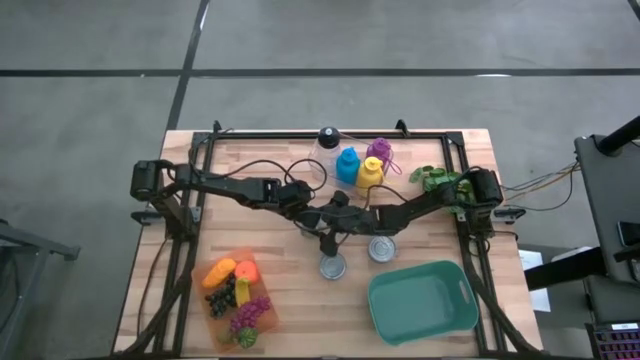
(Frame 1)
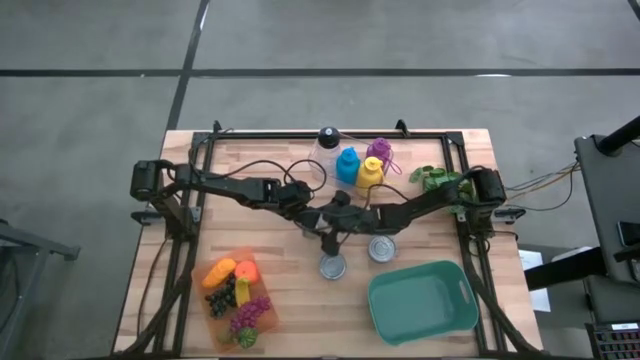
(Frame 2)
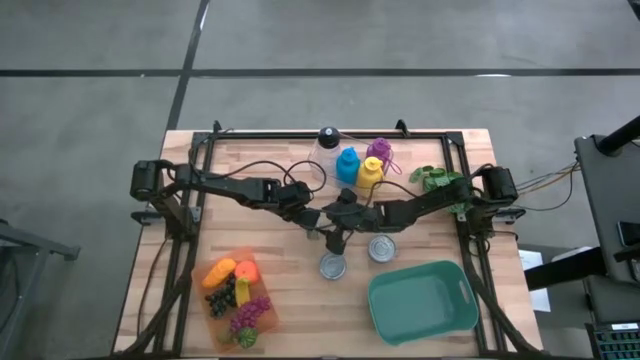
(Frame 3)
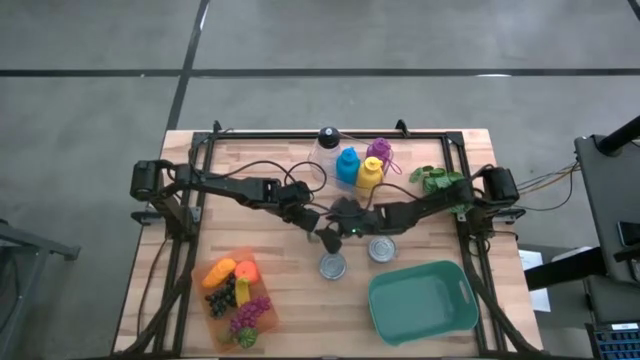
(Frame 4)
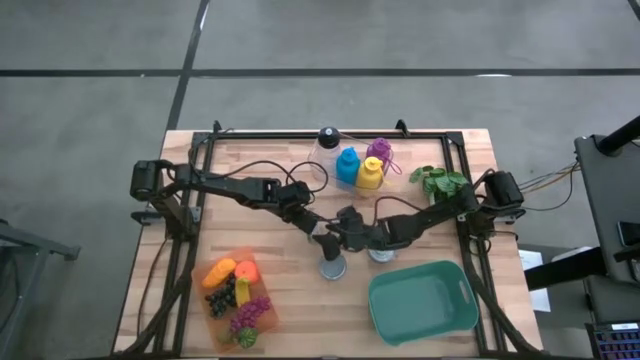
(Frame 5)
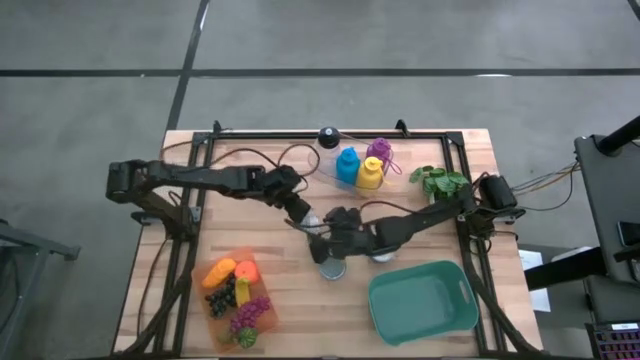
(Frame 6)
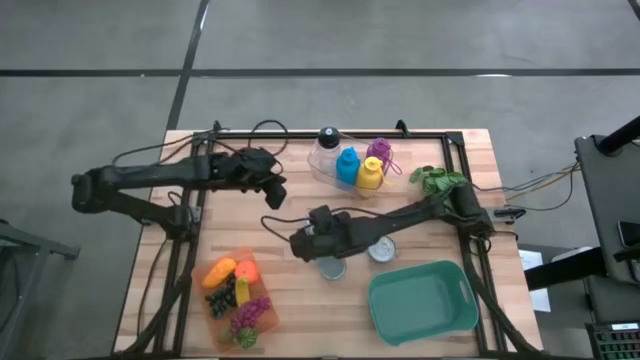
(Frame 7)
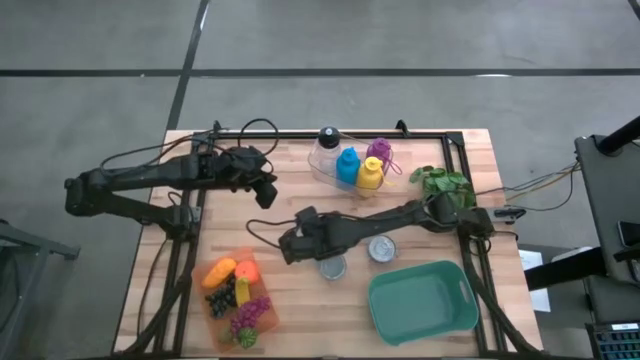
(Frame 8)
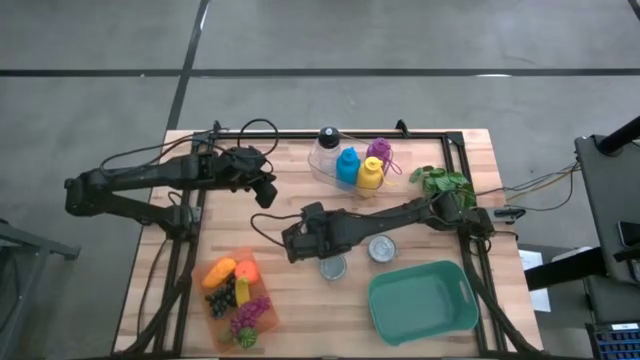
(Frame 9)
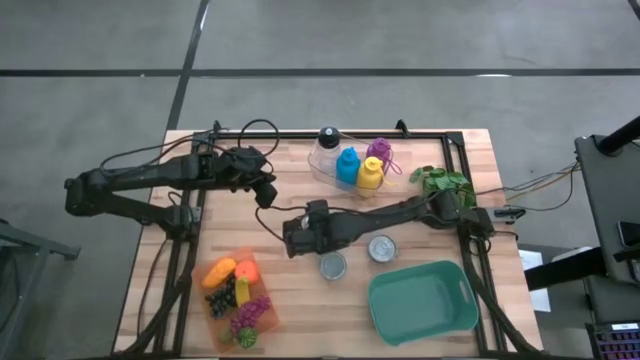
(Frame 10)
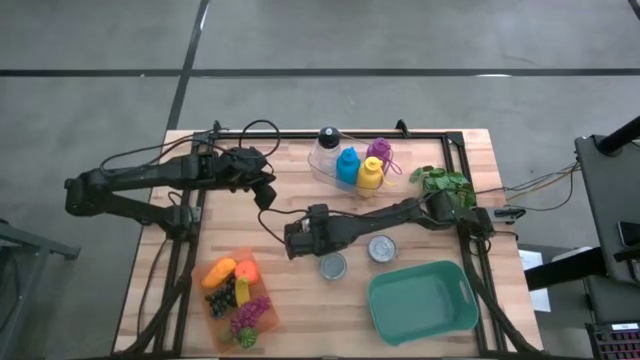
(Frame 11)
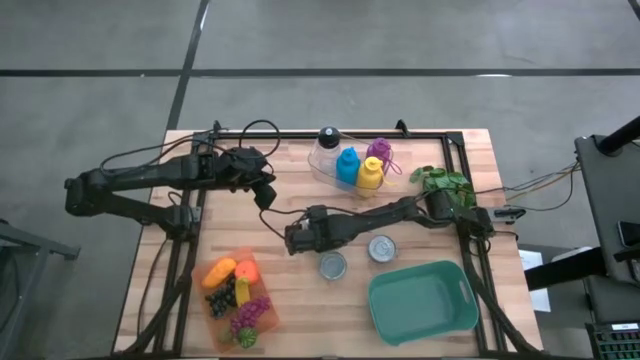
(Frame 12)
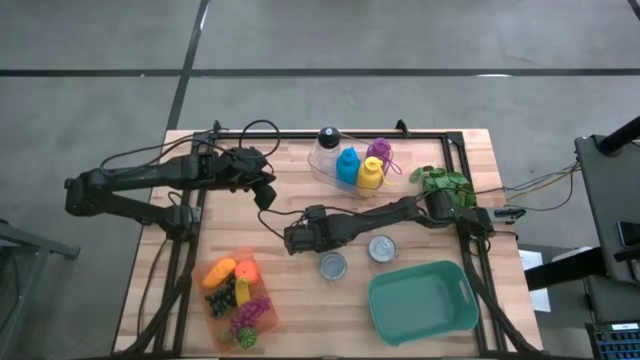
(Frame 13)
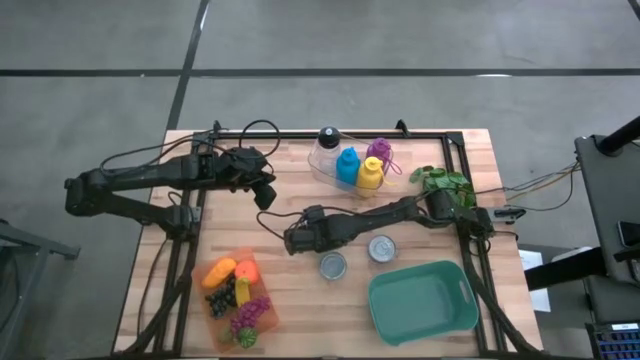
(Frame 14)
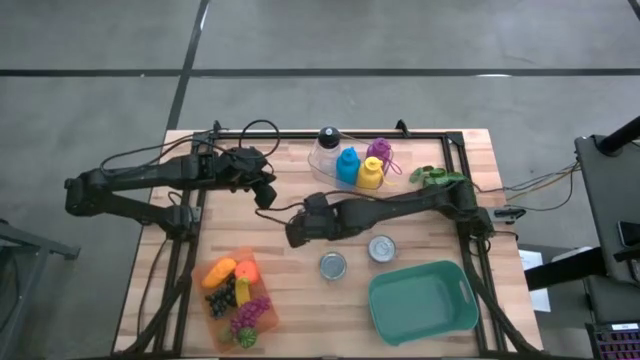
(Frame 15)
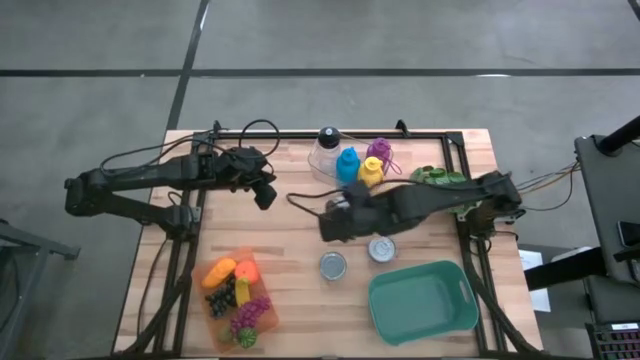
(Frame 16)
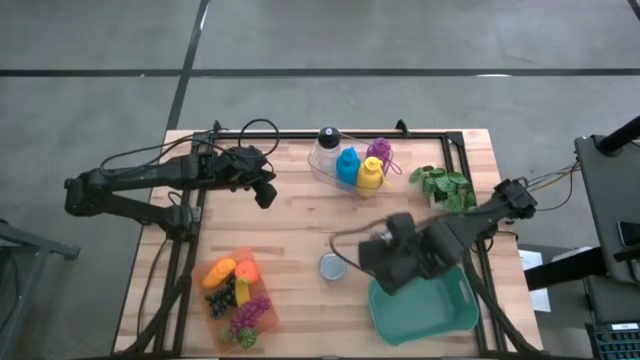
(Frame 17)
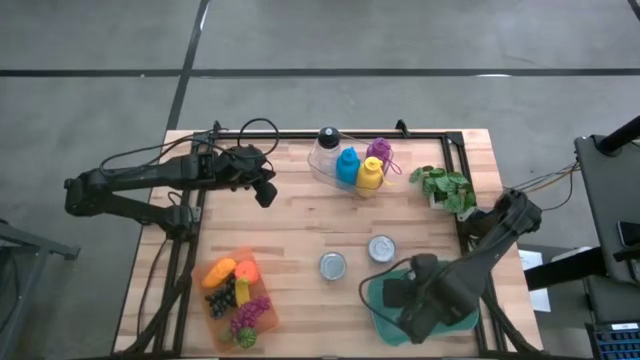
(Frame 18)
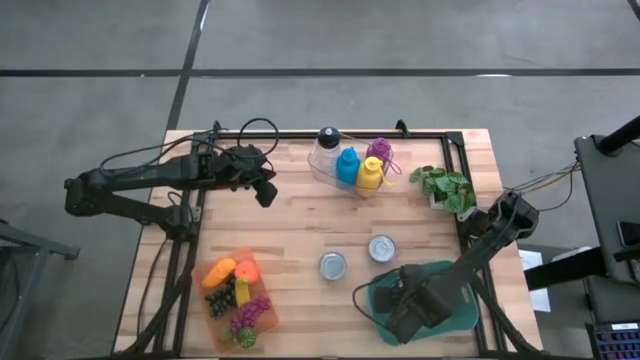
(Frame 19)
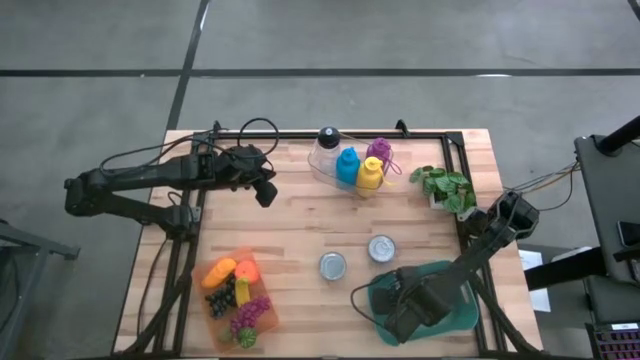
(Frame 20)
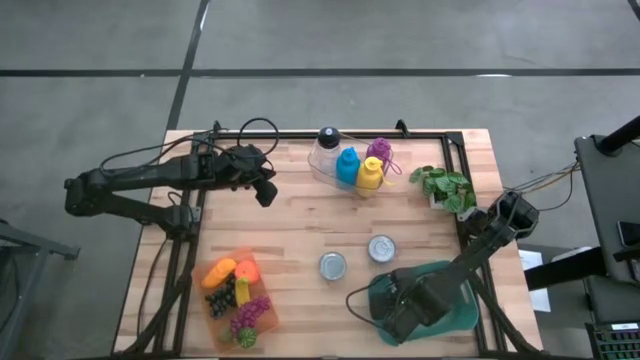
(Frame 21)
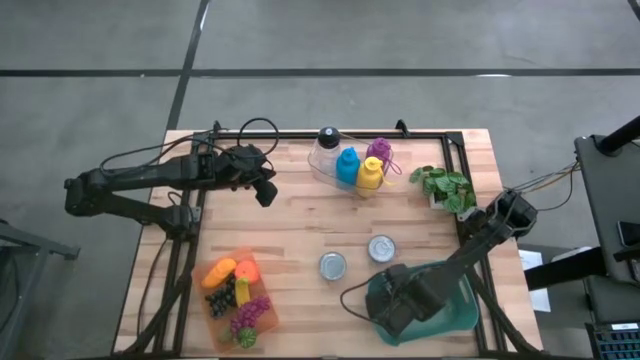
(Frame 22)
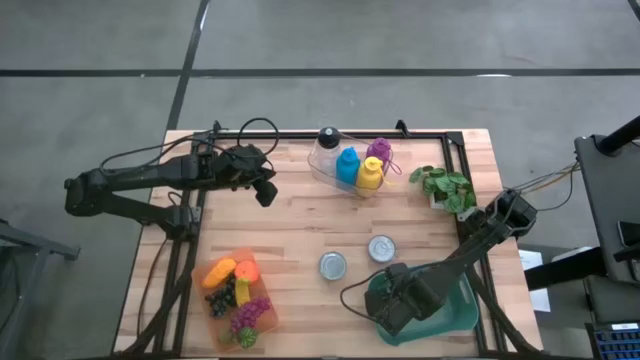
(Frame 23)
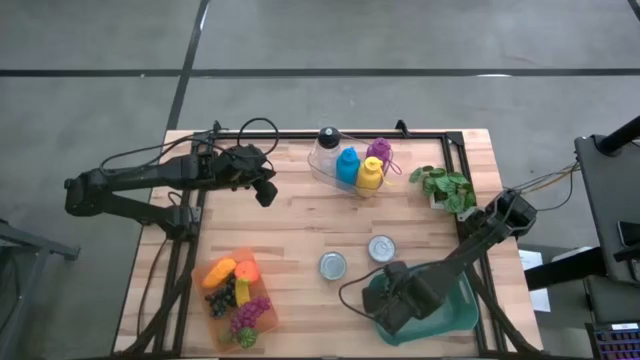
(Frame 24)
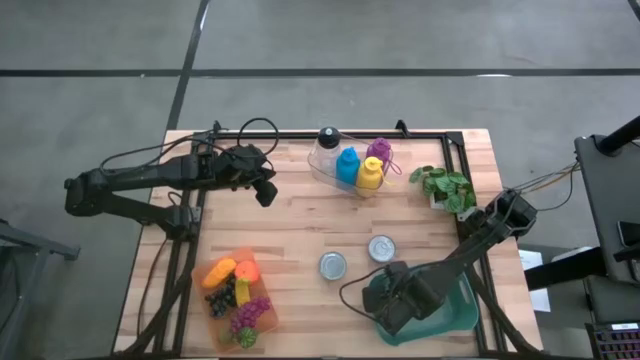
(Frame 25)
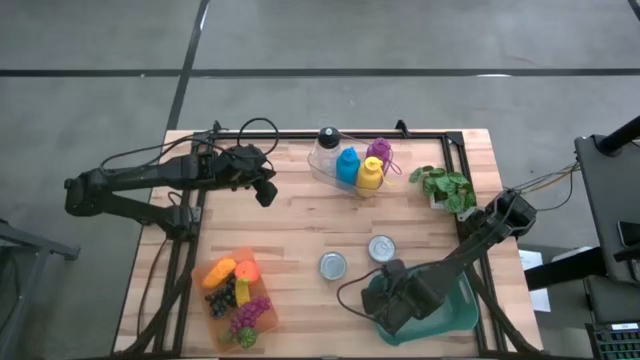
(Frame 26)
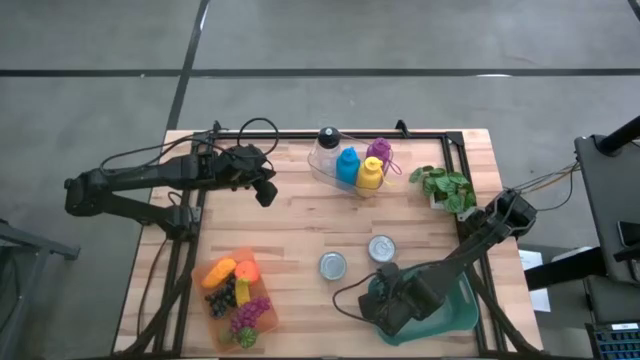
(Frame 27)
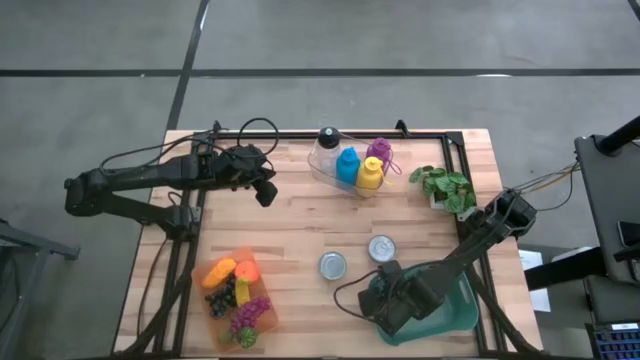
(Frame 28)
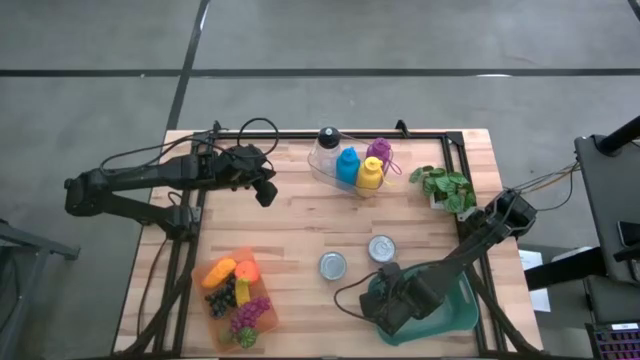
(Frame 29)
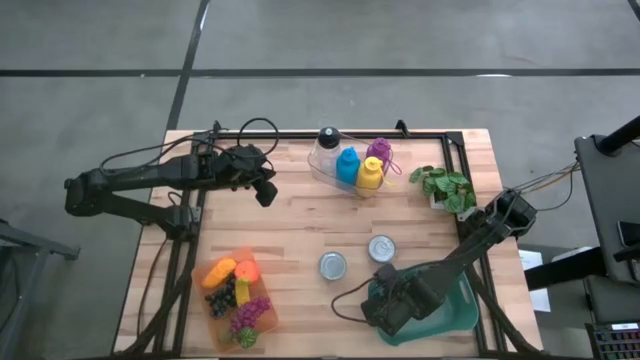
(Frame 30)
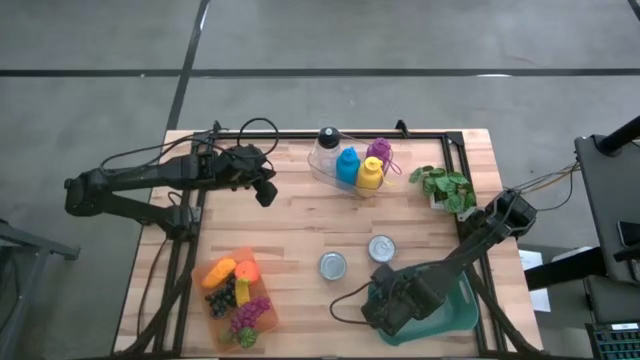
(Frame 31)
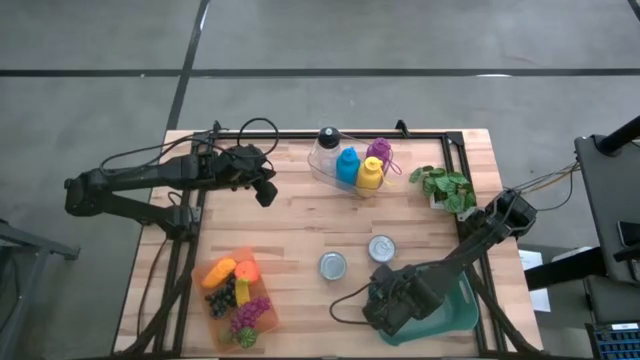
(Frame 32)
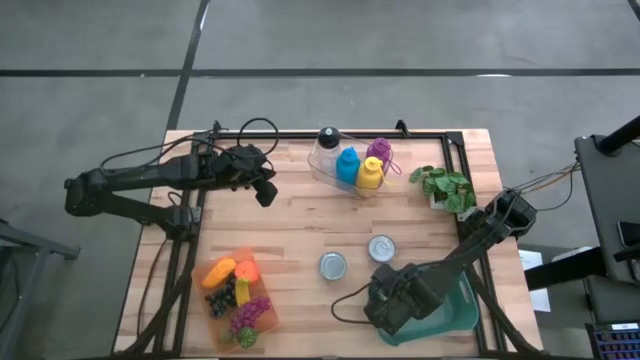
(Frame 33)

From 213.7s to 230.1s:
Task: Pick & Place Food Item
Put the top green tuna can into the green bin

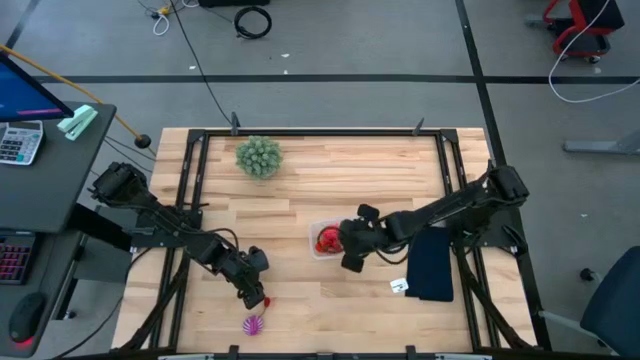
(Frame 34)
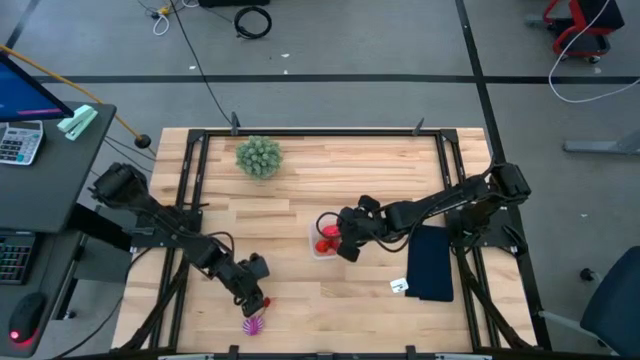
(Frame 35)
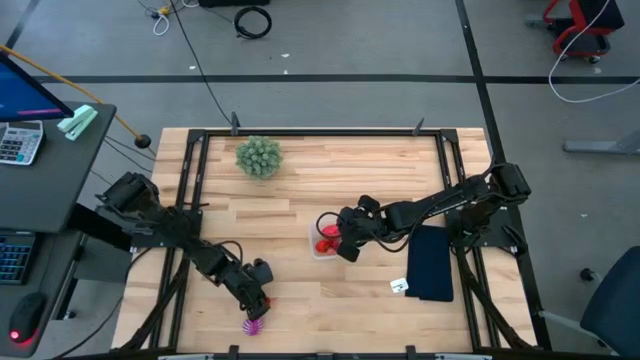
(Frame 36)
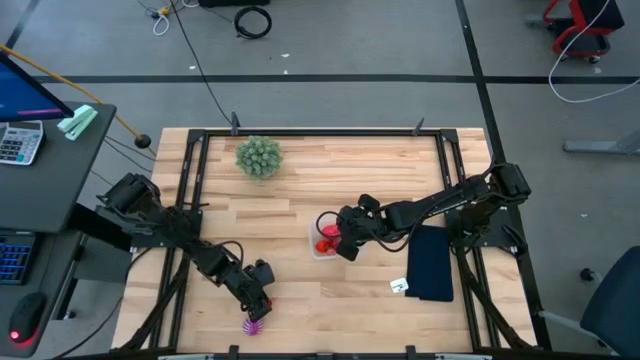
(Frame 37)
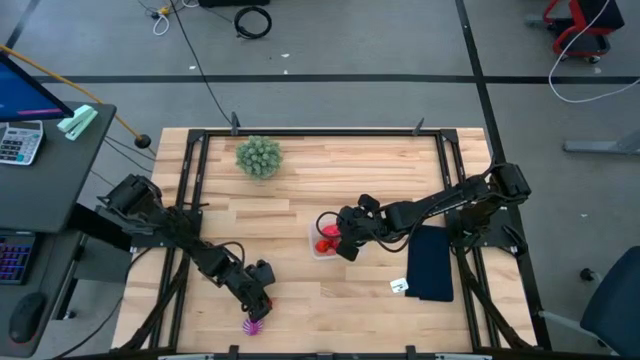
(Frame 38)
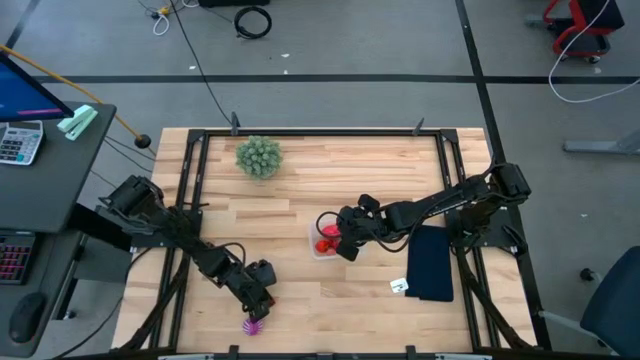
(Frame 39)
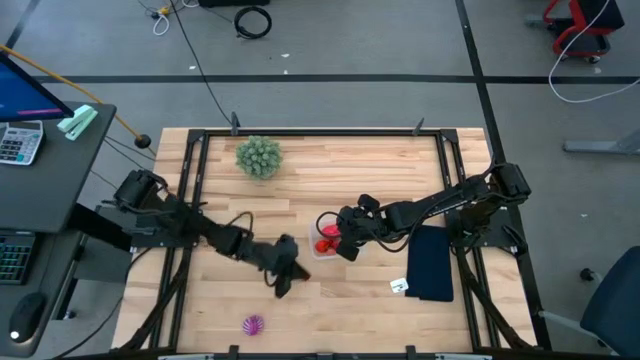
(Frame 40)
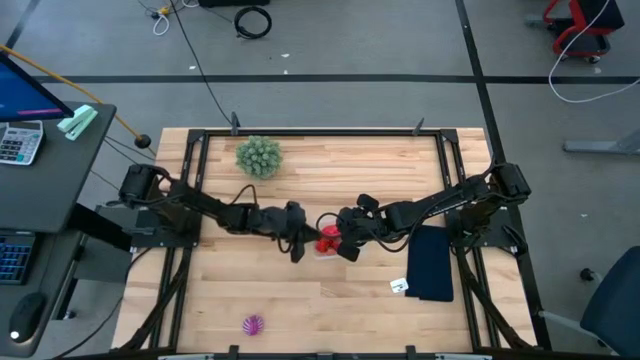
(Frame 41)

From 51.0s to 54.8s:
Task: Pick and placing Produce into tupperware
Put the red cherry into the transparent bin

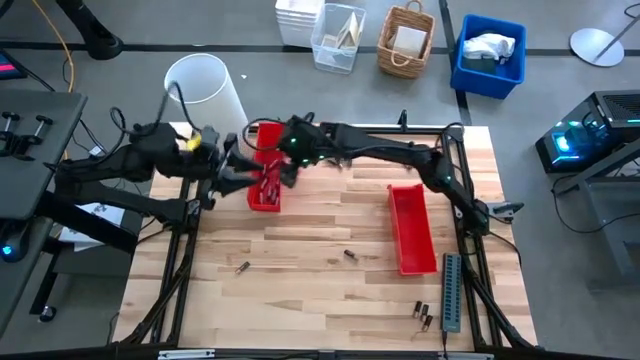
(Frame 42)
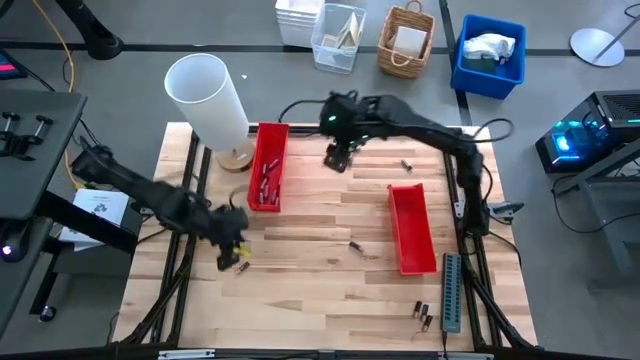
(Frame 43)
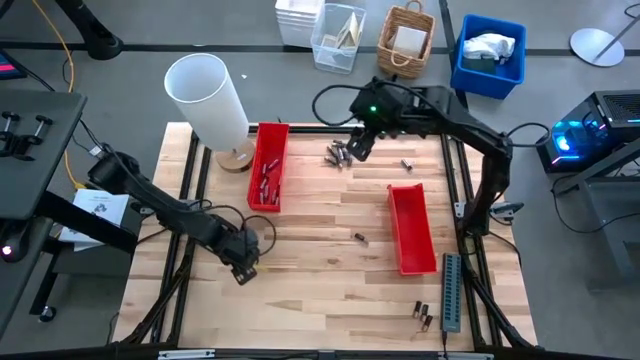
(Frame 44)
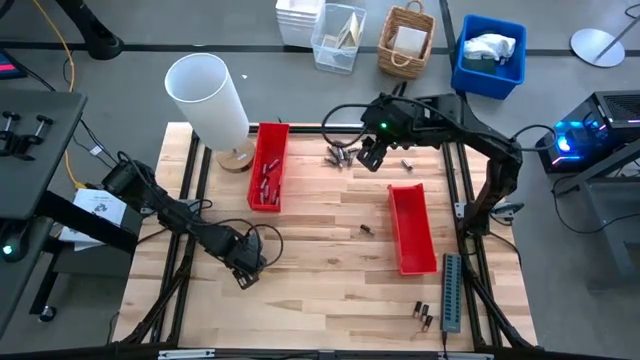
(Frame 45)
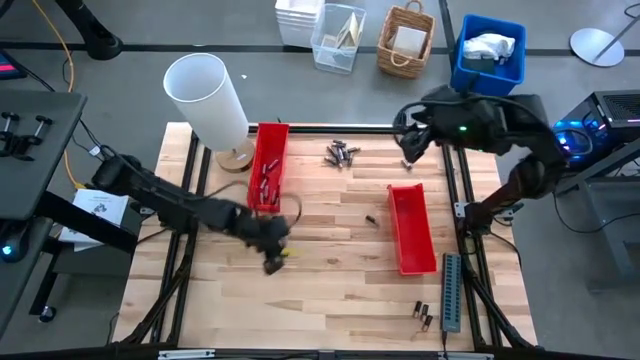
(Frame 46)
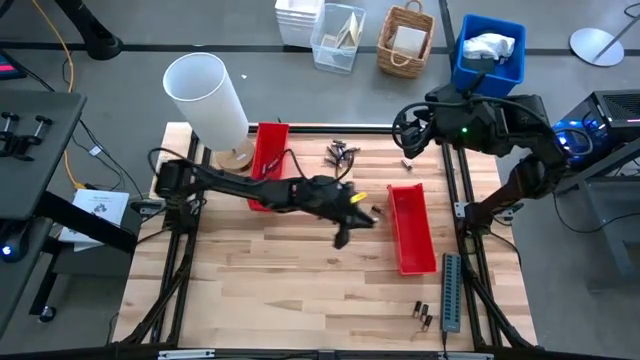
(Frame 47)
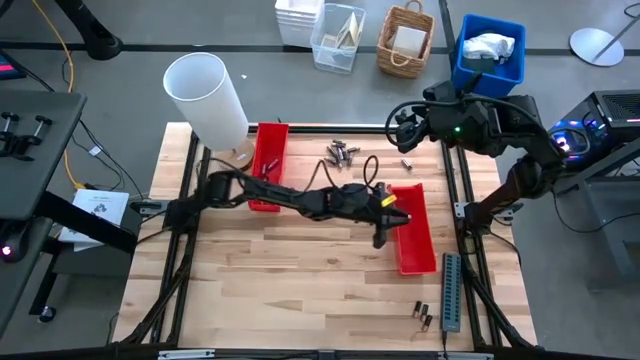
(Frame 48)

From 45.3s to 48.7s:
Task: Sort batteries
Put the black battery into the bottom red bin
